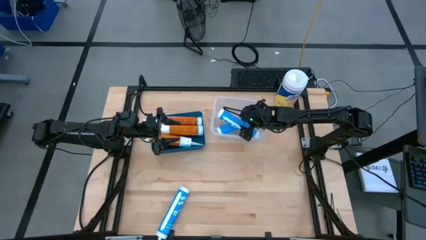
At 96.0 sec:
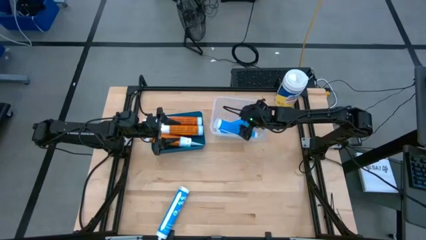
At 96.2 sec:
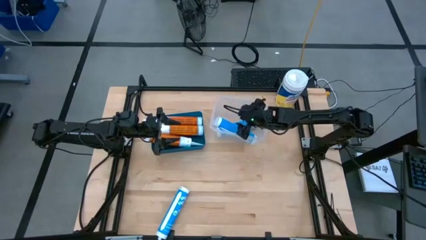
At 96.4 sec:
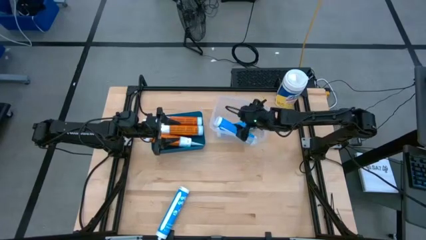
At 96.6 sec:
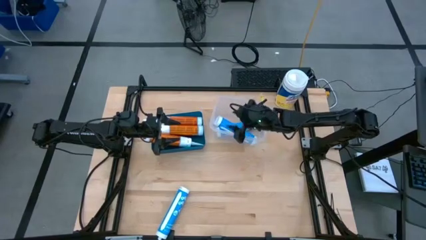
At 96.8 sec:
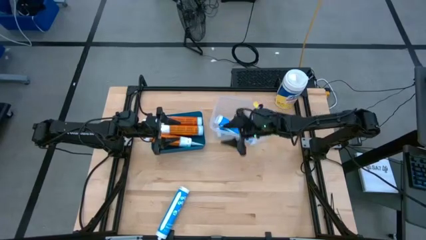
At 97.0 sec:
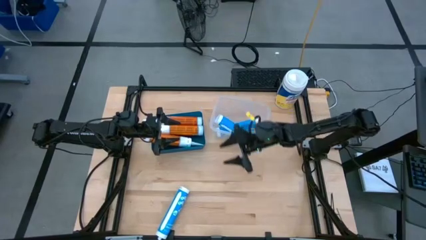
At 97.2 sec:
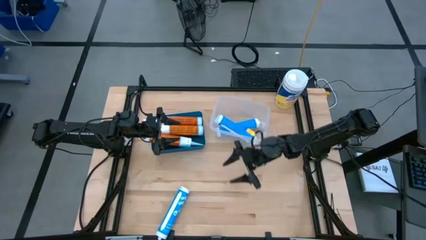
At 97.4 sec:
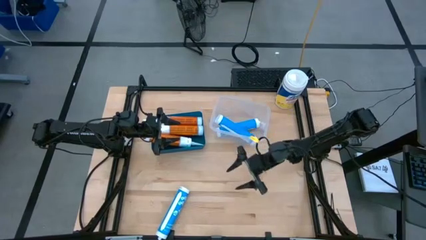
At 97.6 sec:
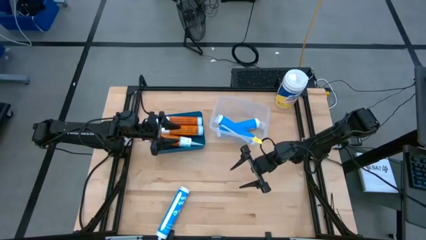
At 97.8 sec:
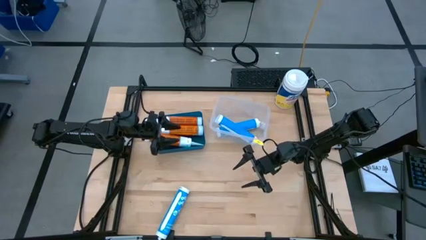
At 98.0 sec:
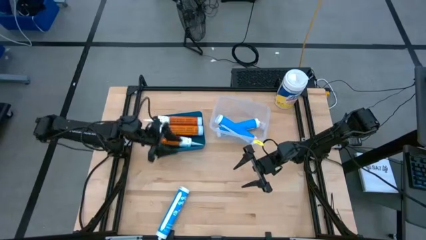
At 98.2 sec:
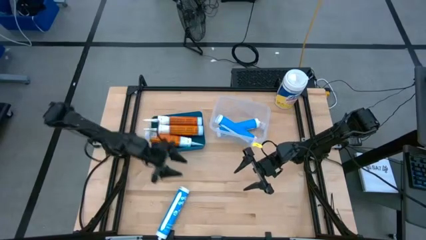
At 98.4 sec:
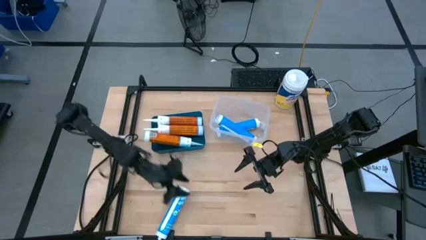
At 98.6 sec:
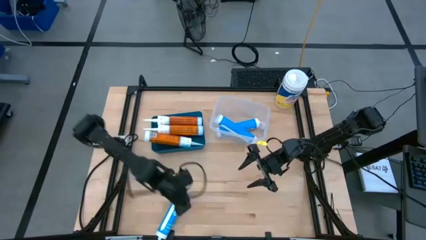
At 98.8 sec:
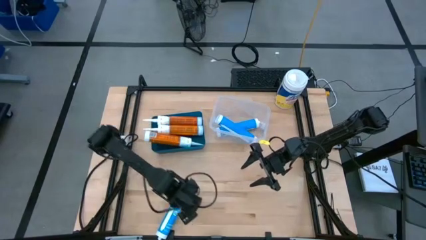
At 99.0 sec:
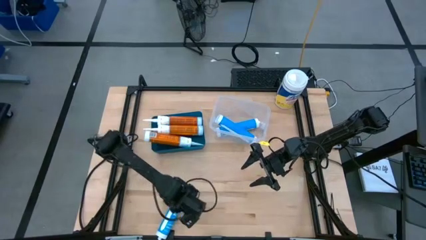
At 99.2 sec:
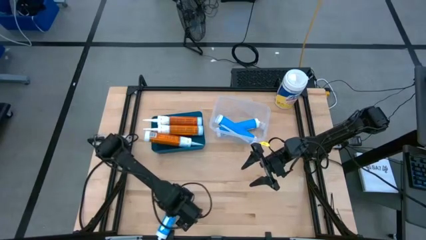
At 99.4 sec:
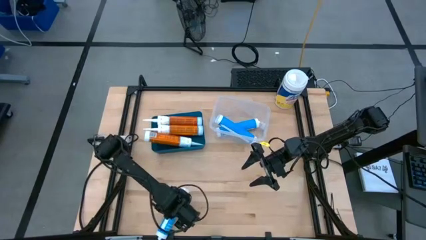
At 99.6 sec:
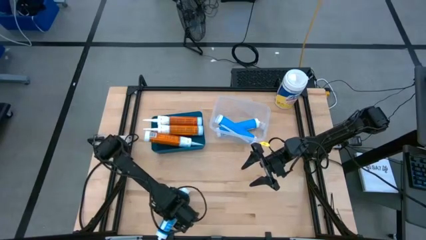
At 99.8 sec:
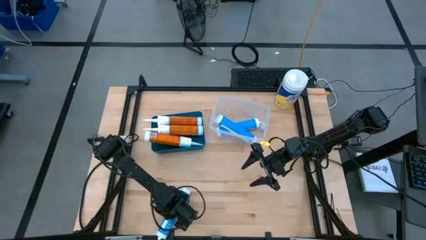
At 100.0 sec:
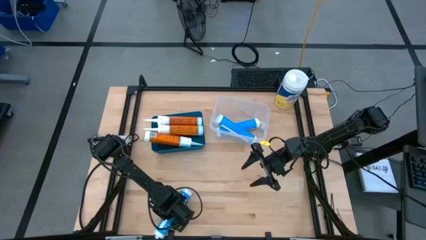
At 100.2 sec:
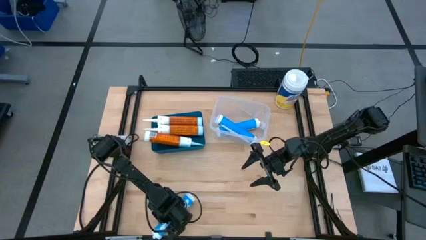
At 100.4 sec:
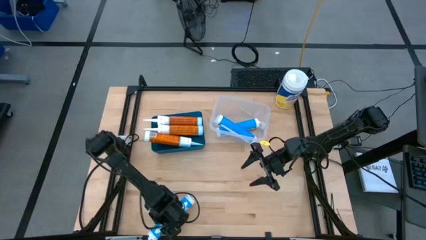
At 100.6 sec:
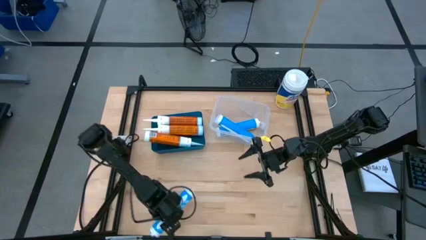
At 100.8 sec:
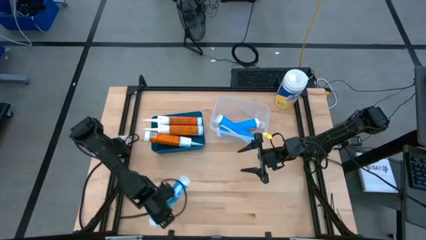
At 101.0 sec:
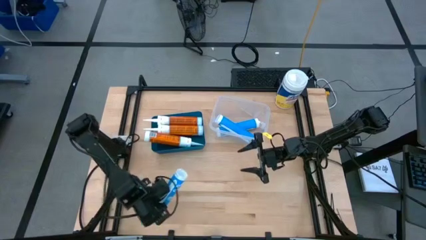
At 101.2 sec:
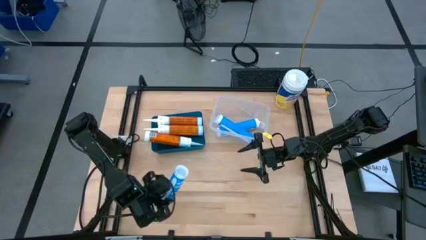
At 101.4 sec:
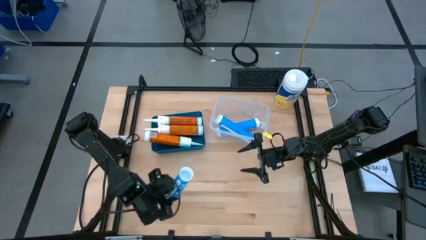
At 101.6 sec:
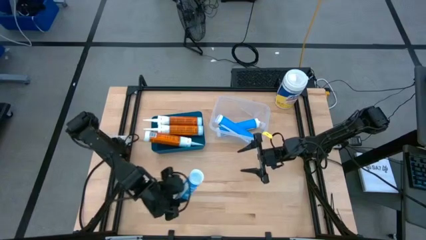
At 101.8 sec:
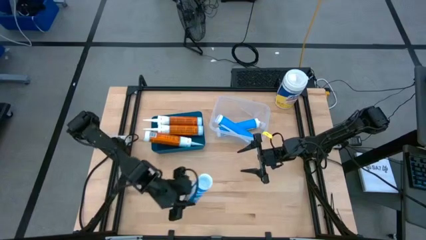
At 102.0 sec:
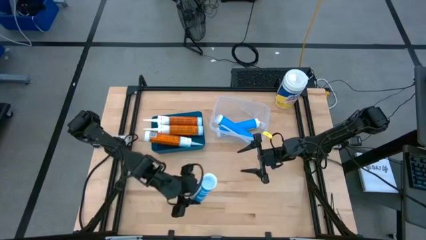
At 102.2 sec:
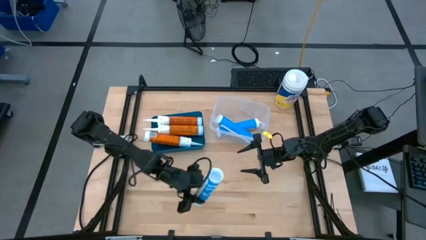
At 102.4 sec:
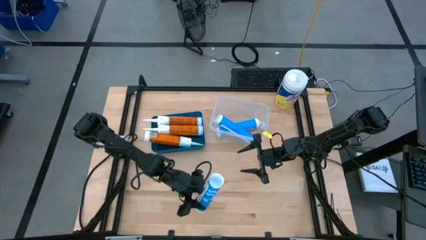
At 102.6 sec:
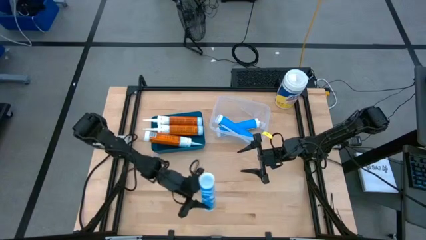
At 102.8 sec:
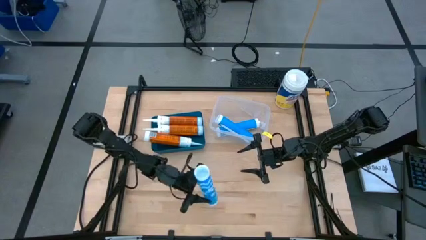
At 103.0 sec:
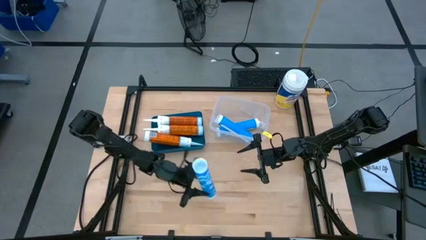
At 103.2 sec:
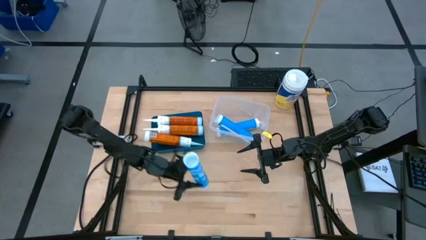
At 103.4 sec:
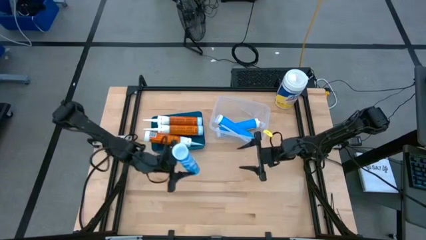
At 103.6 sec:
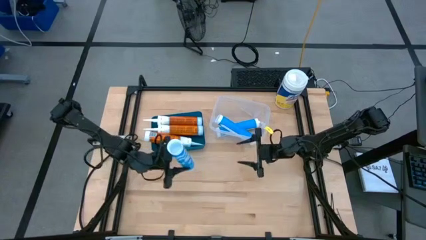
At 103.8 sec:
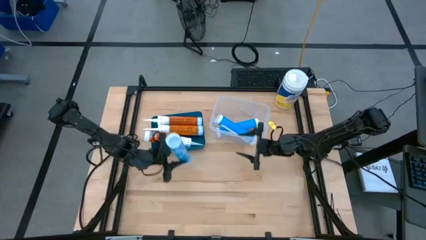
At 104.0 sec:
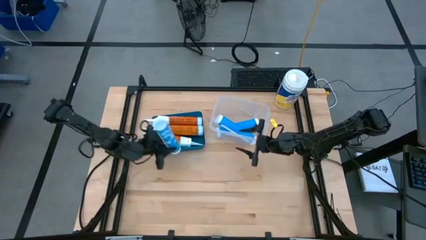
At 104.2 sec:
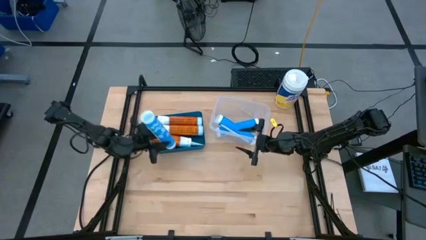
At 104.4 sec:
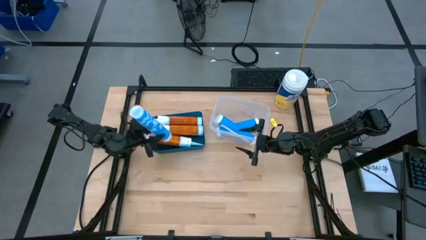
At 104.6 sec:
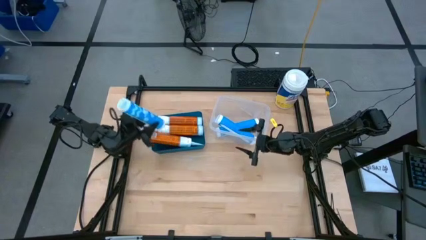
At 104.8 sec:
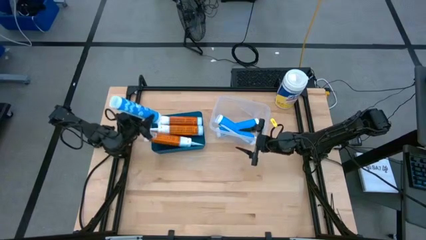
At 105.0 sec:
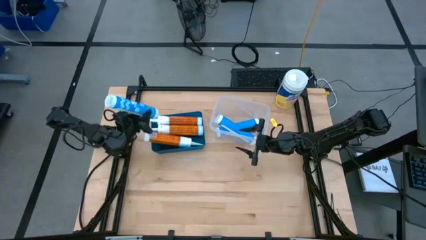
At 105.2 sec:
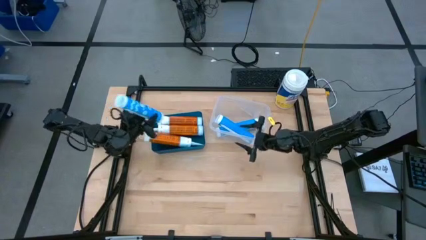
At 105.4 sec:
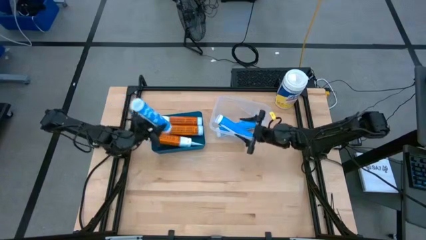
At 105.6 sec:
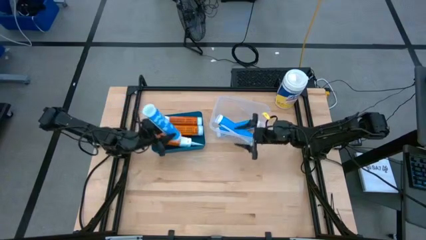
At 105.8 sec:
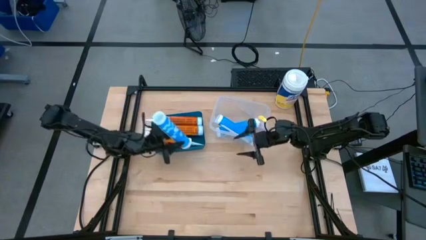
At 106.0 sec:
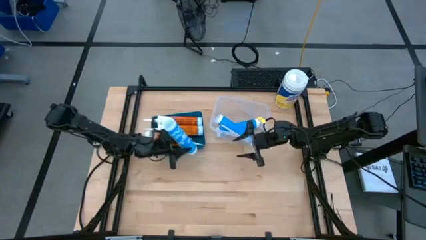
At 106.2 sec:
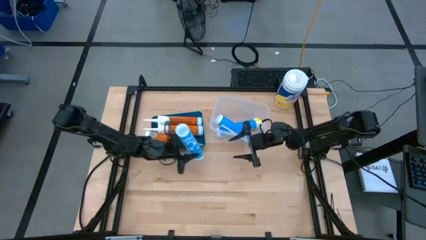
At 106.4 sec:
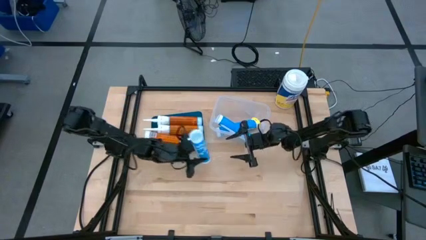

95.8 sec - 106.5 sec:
Task: Pick & place silicon tubes, Sealant and Lysol wipes
Put the blue sealant into the transparent bin

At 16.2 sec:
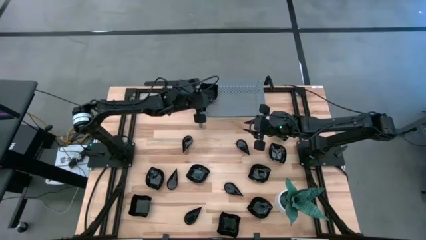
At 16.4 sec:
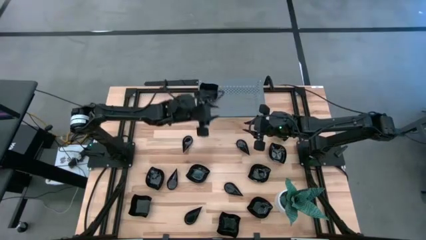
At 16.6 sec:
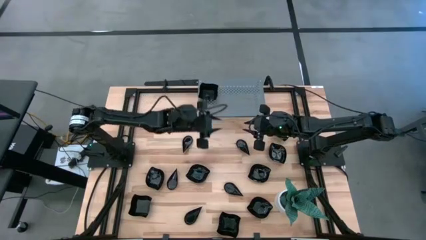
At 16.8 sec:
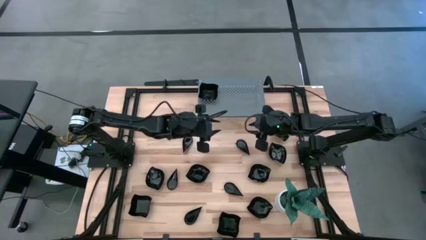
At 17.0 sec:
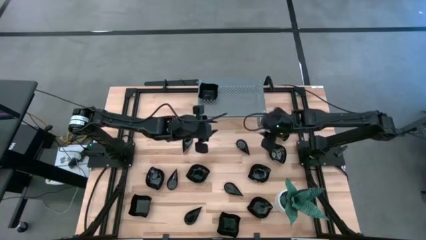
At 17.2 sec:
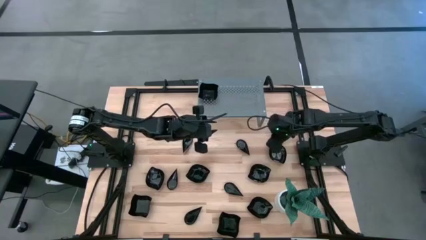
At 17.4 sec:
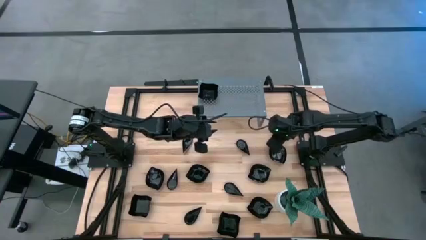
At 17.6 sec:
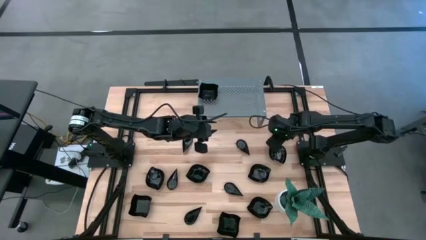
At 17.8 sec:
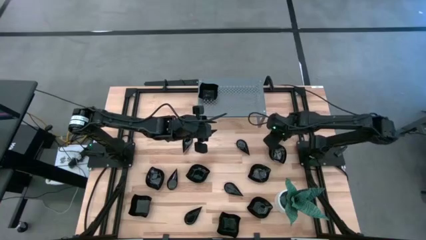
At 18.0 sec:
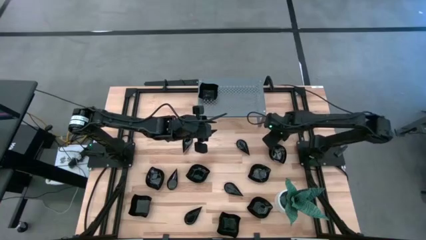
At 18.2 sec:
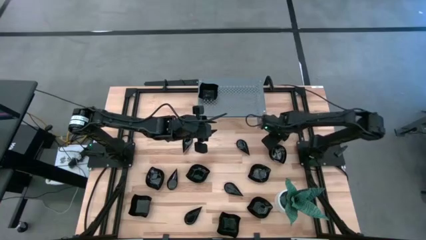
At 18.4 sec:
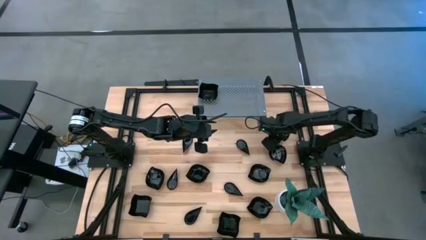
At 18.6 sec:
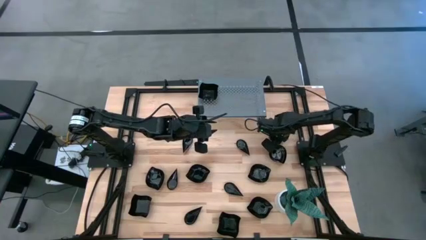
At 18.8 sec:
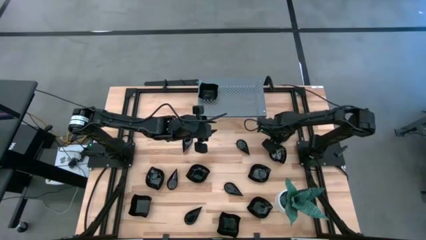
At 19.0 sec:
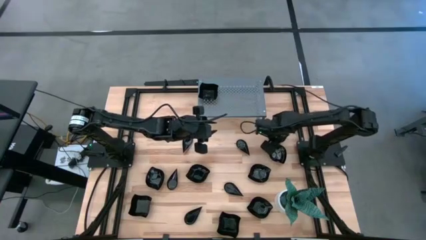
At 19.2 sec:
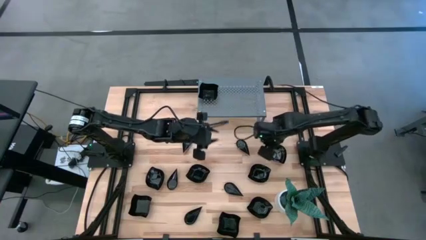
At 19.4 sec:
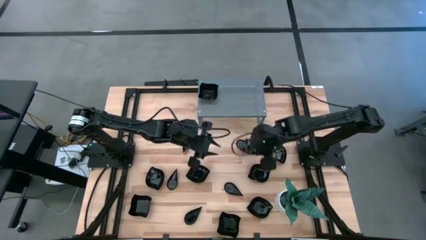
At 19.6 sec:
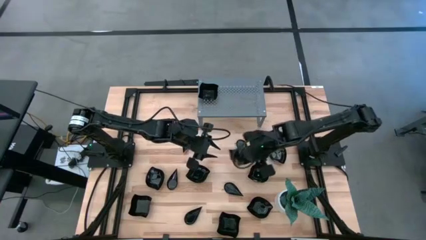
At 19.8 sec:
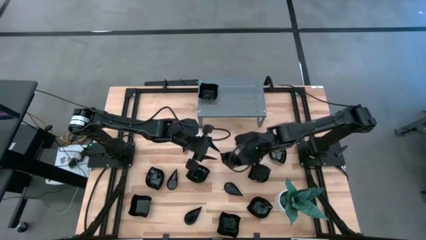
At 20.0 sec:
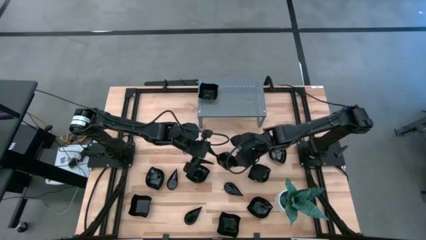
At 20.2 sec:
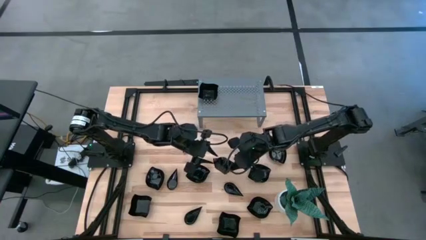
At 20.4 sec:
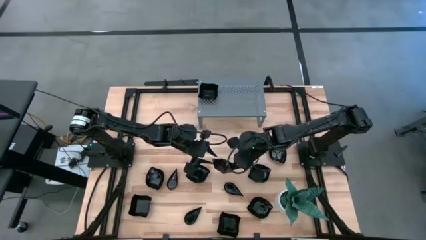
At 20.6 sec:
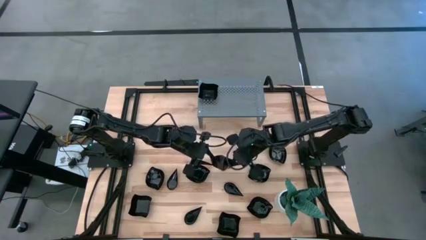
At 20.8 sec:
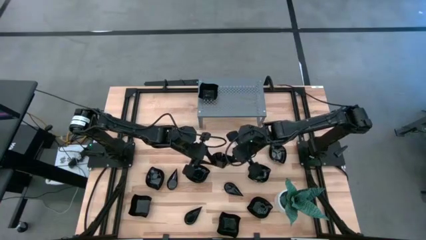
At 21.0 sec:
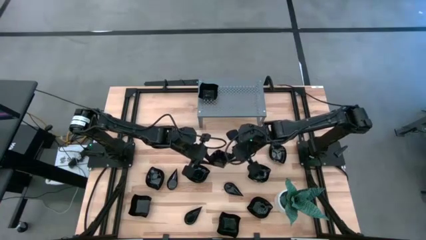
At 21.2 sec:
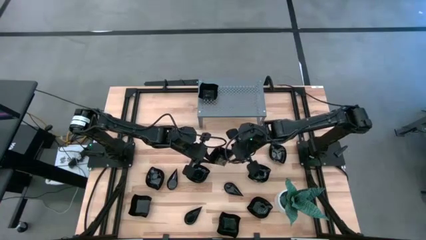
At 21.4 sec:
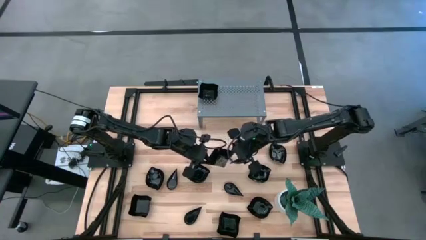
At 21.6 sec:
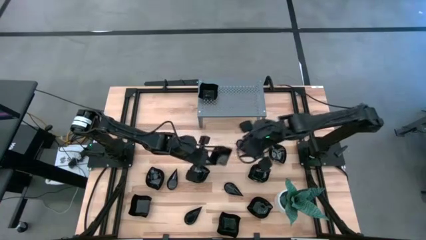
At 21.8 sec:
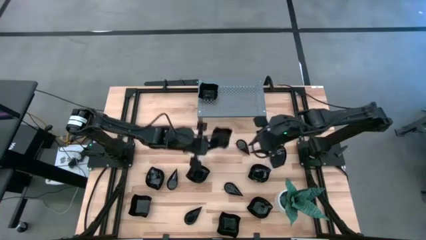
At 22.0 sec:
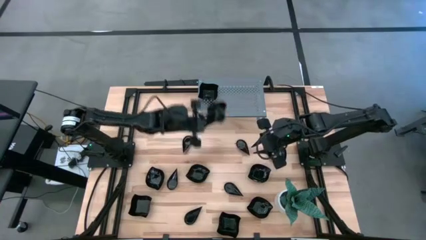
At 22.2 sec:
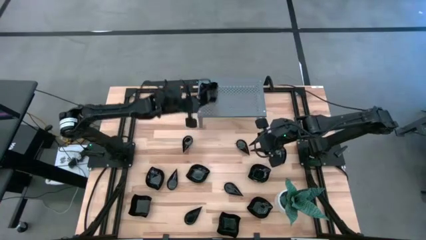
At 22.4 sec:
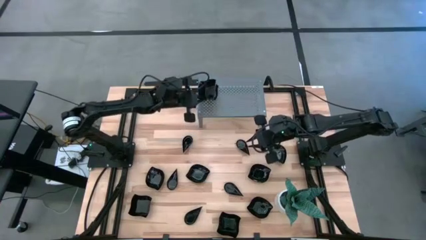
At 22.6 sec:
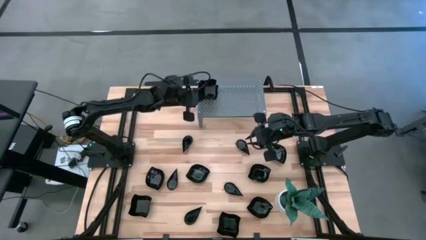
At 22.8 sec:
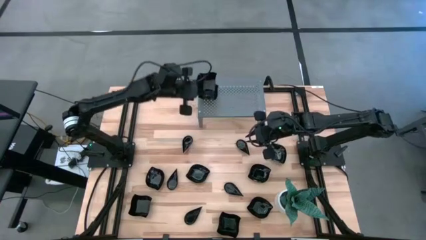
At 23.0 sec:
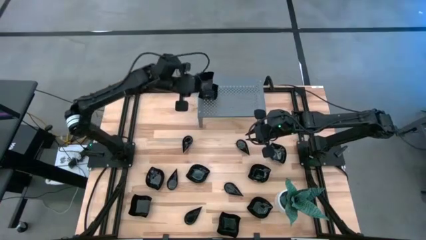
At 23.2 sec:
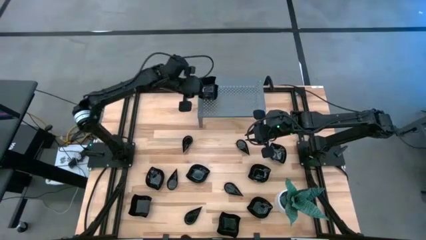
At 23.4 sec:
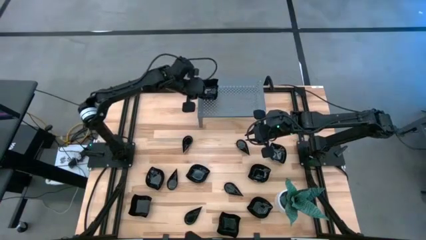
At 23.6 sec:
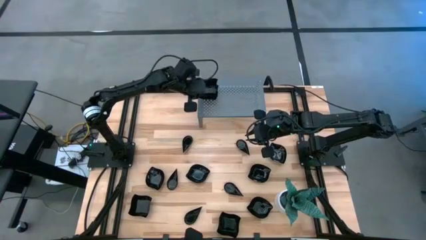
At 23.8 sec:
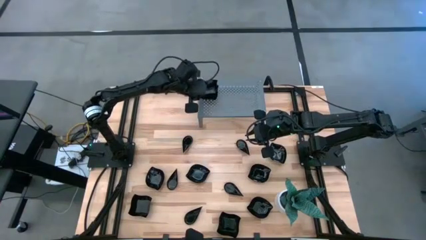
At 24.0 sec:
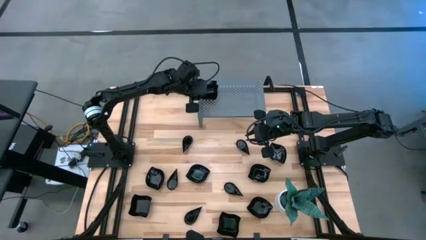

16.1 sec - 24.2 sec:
Task: Pick & Place Mini shaped plates
Stack the distorted square plate on top of the distorted plate on the shelf
